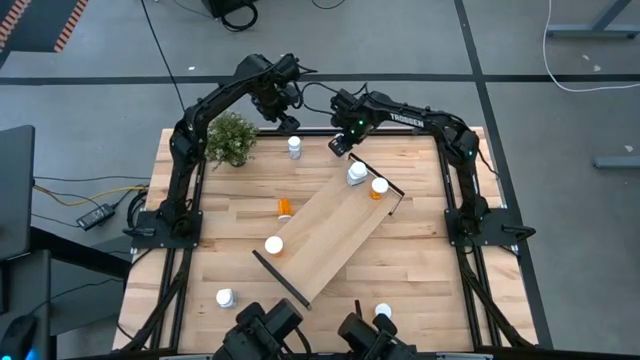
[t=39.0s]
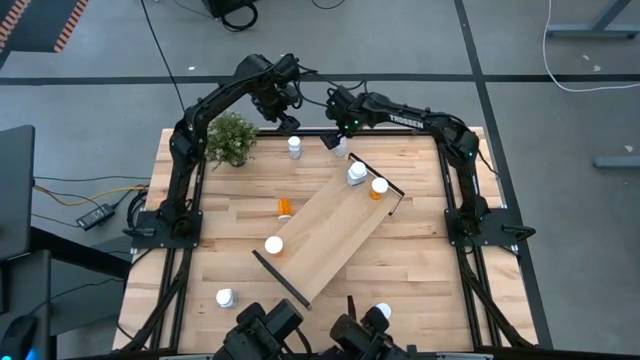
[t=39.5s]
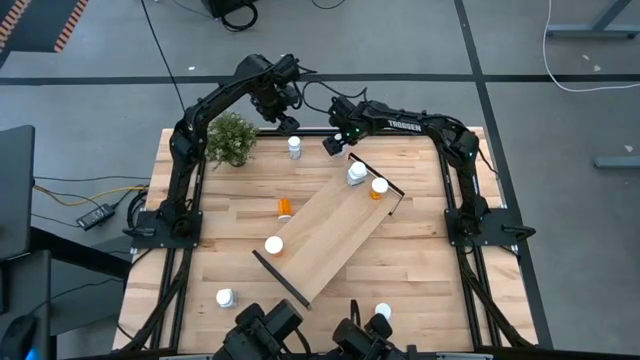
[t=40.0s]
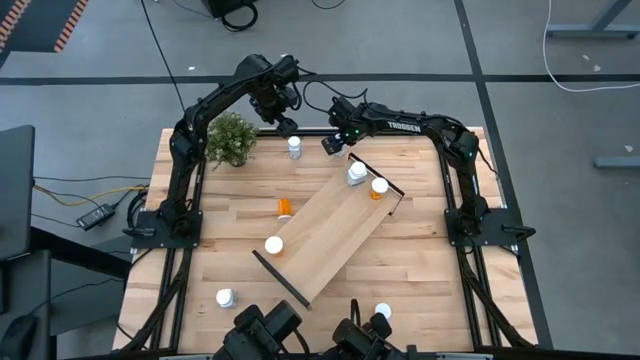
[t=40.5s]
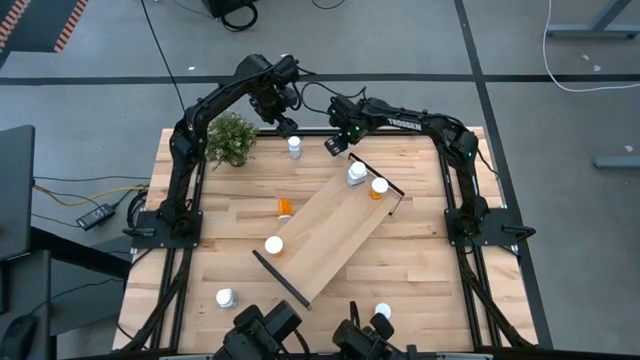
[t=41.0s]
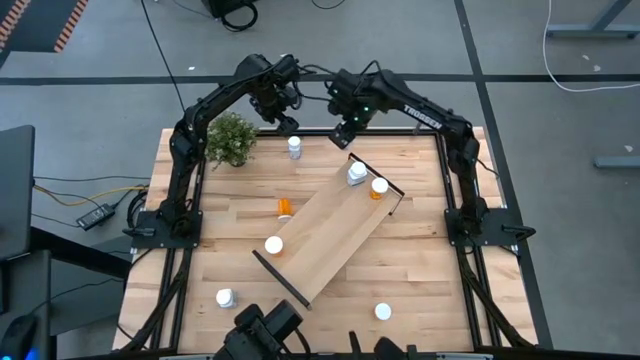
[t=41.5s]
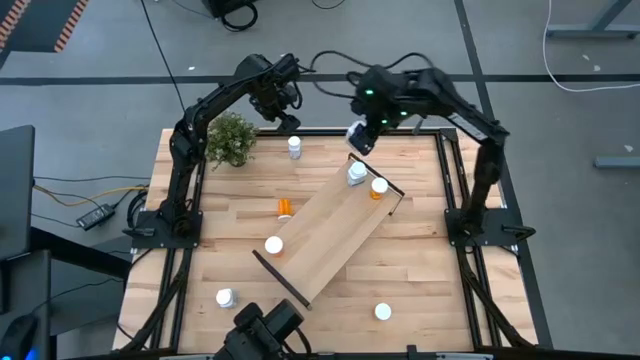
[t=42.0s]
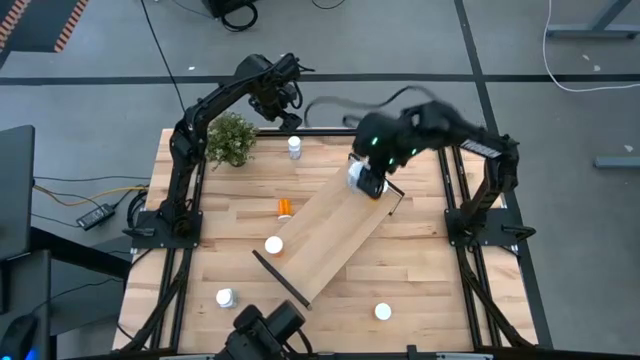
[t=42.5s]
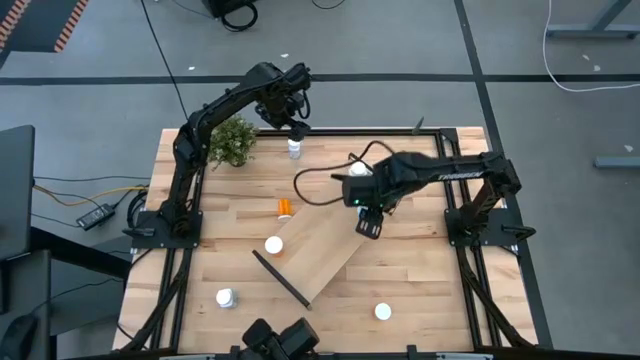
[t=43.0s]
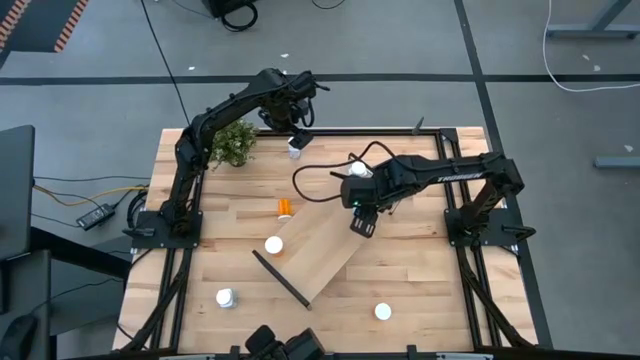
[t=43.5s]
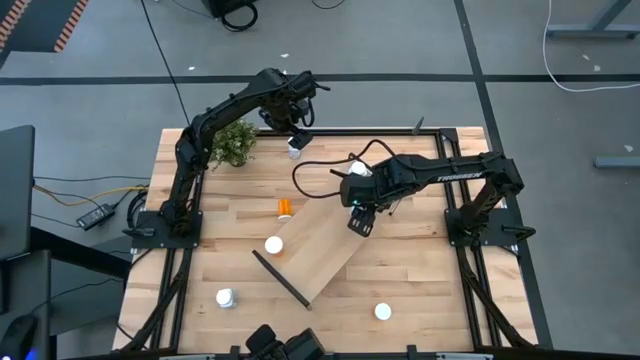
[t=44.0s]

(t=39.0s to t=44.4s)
Task: Pick and place medicine bottles onto shelf by color
Put the white pill bottle on the shelf

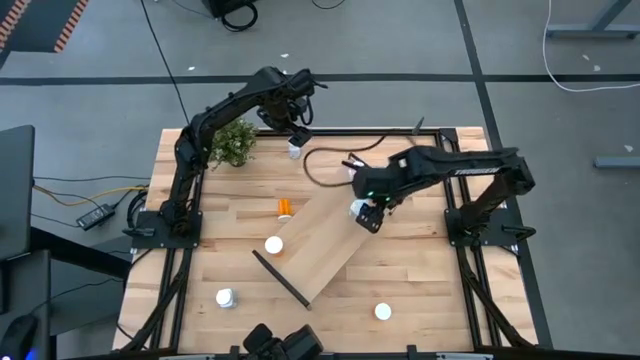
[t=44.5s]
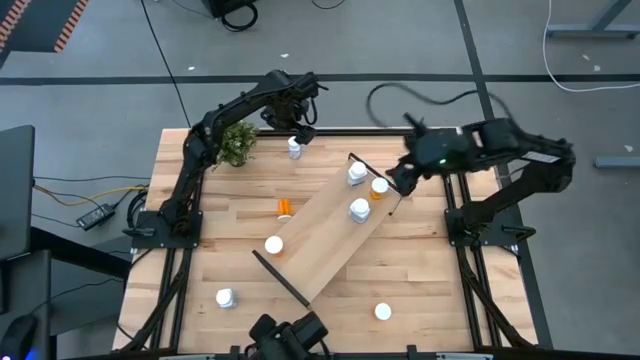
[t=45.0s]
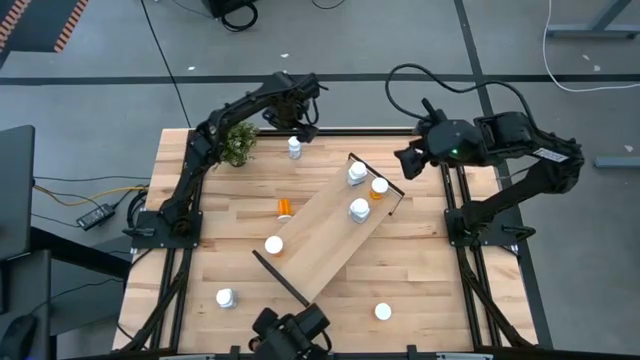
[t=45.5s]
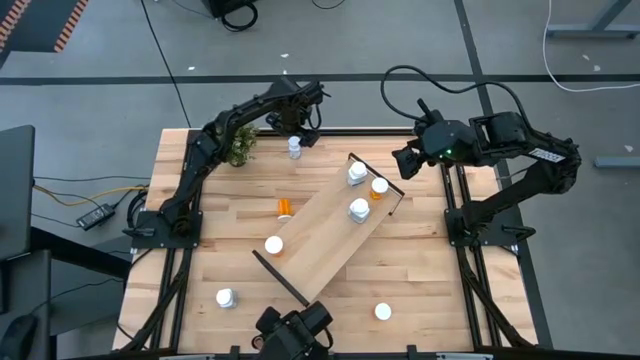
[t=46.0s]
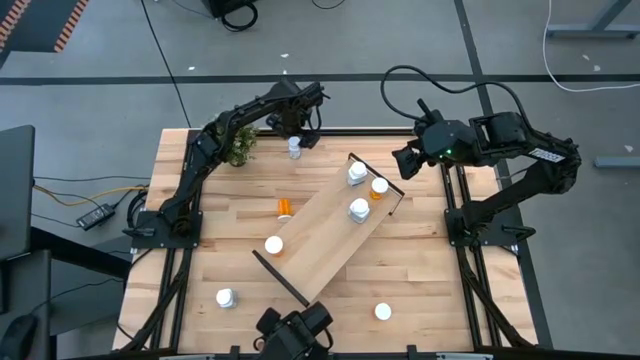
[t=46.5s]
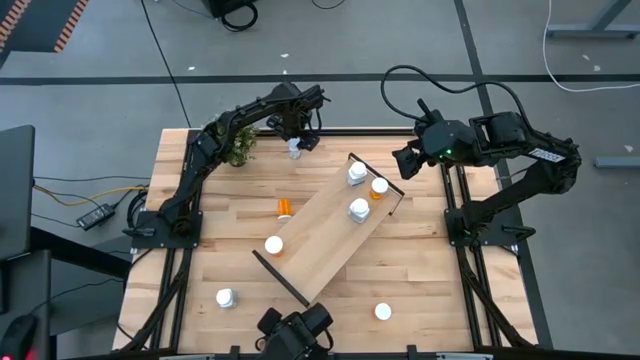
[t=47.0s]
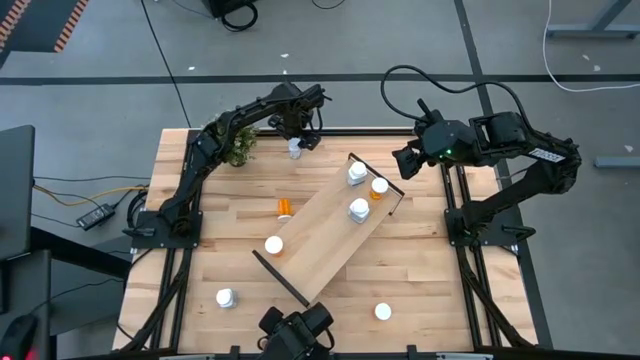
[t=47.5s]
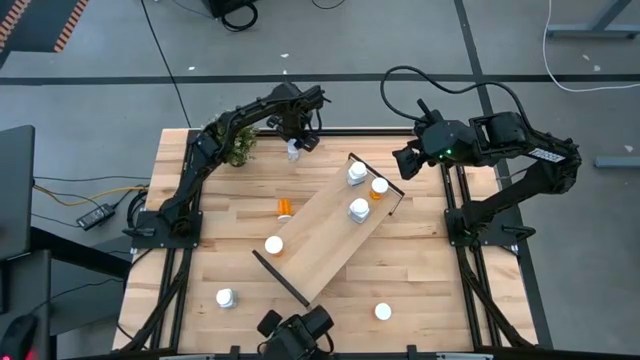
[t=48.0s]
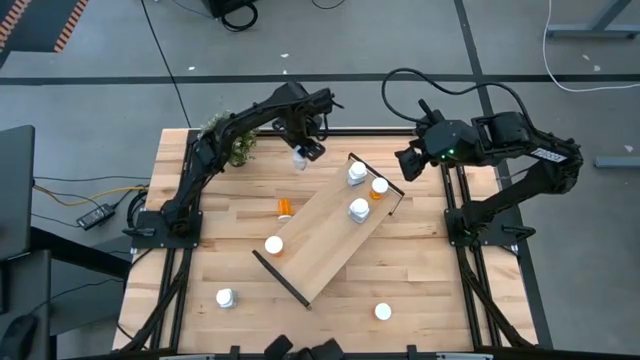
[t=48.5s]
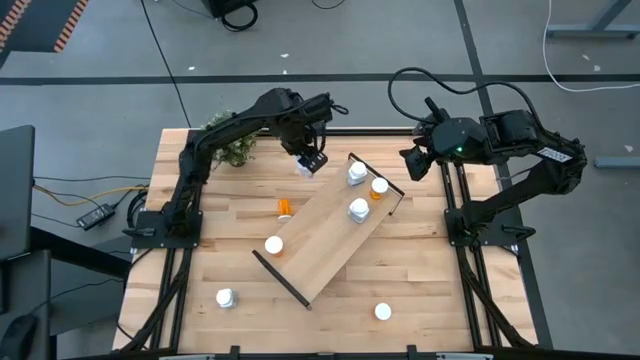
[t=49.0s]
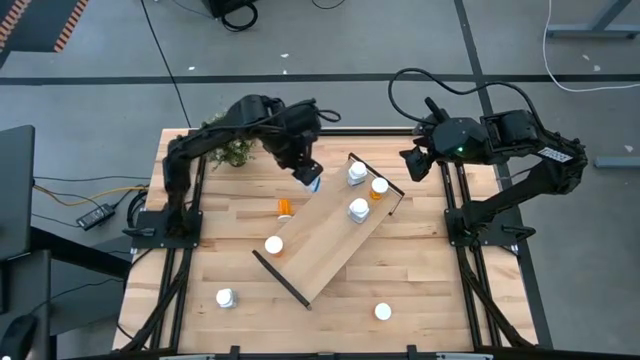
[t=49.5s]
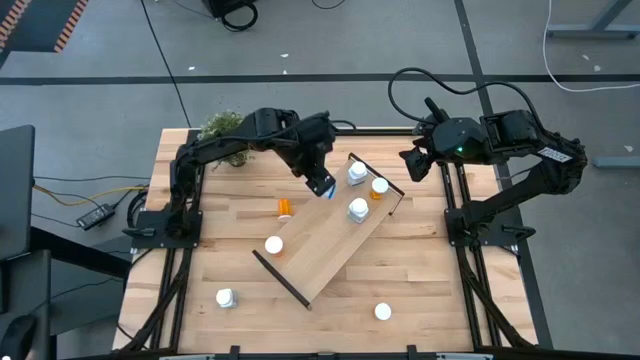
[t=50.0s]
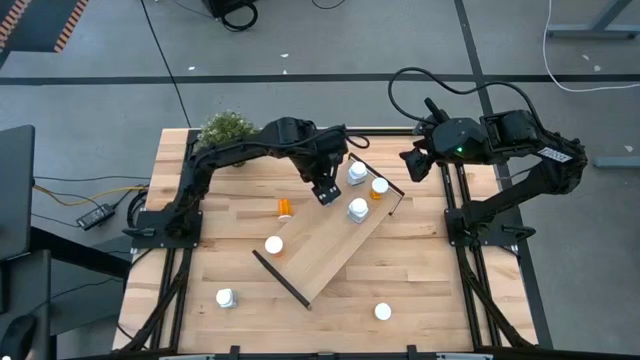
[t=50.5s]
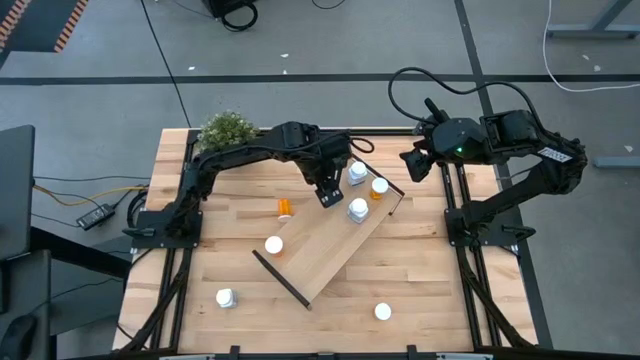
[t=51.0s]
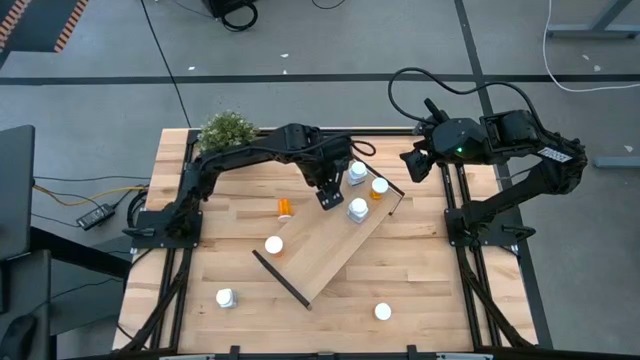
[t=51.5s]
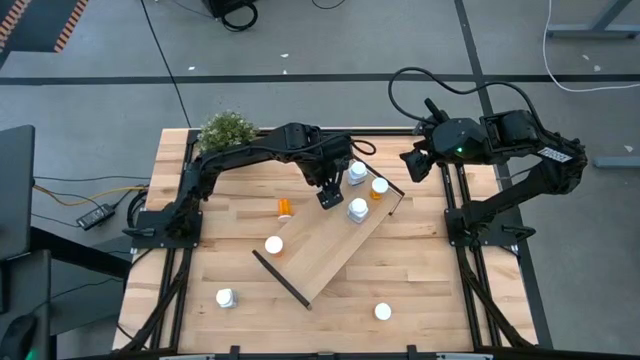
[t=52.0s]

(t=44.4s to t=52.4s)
Put the top white pill bottle on the shelf

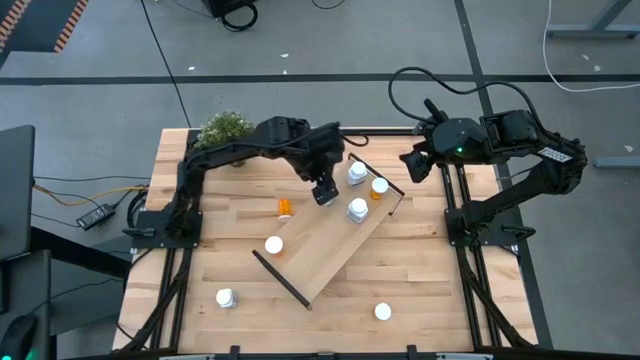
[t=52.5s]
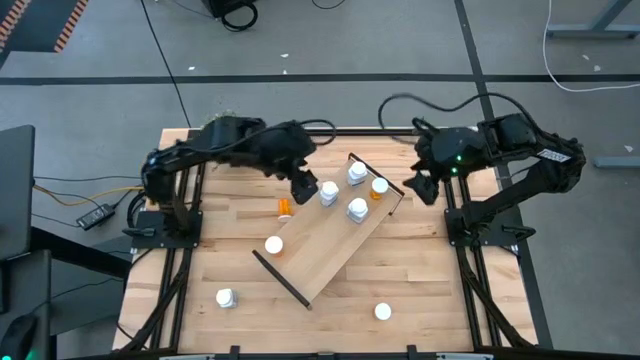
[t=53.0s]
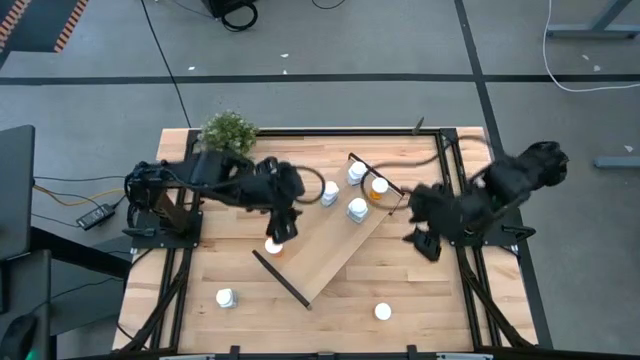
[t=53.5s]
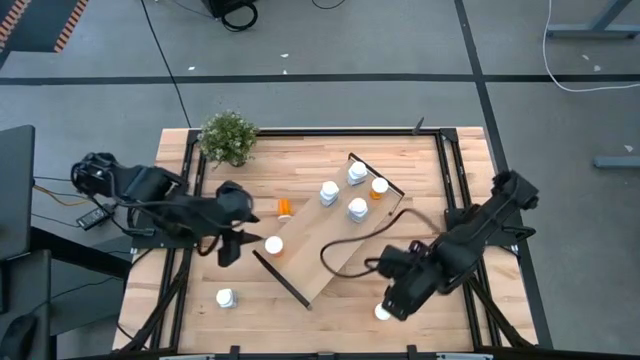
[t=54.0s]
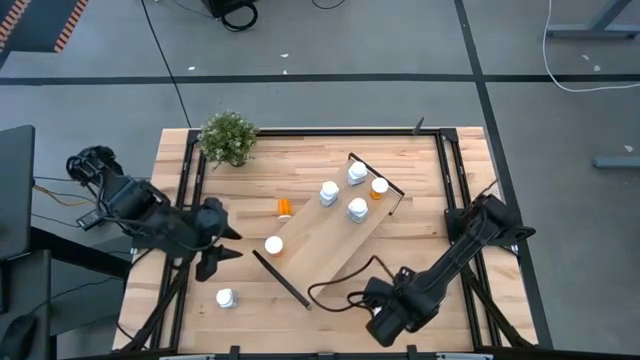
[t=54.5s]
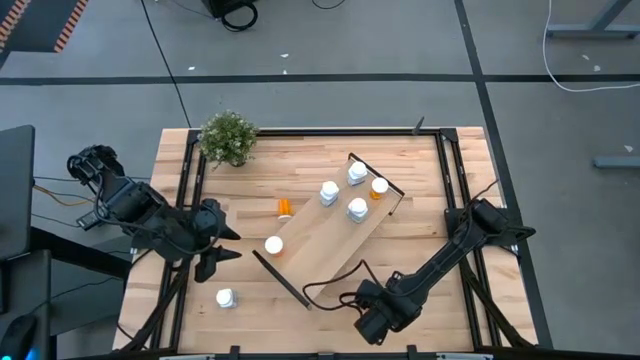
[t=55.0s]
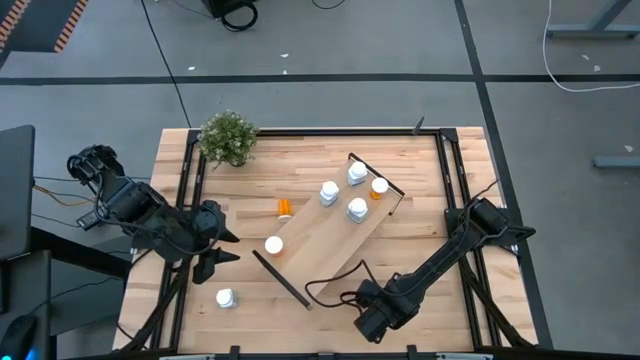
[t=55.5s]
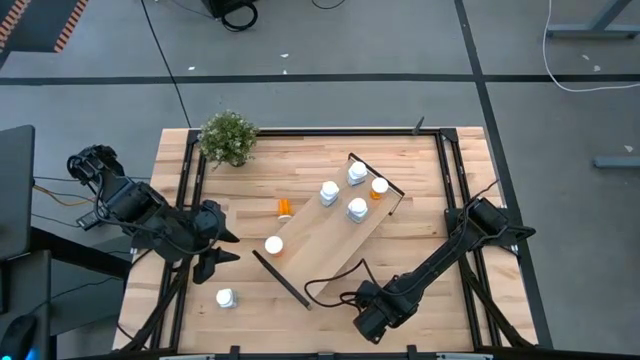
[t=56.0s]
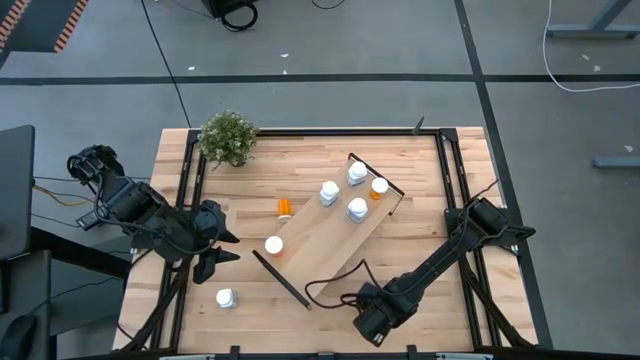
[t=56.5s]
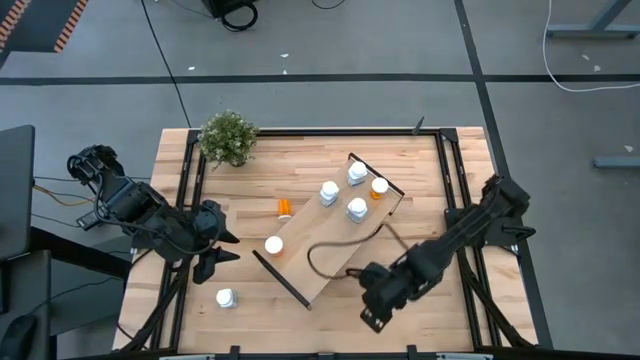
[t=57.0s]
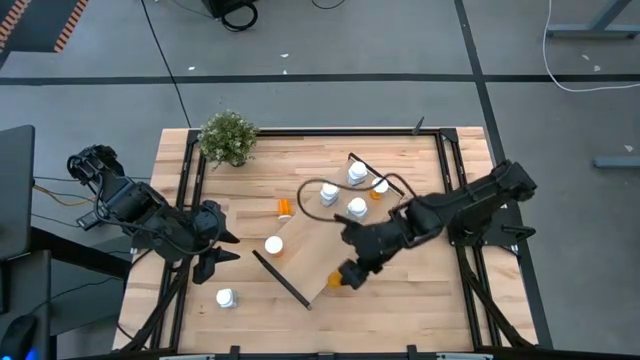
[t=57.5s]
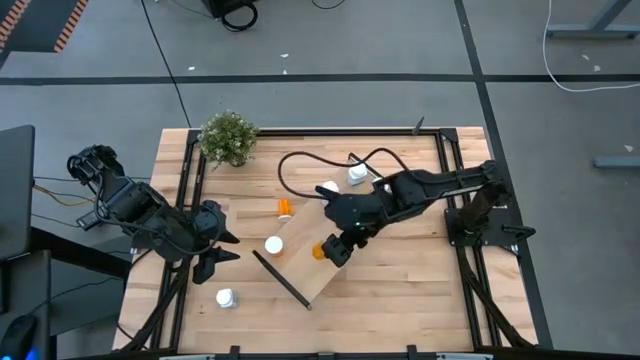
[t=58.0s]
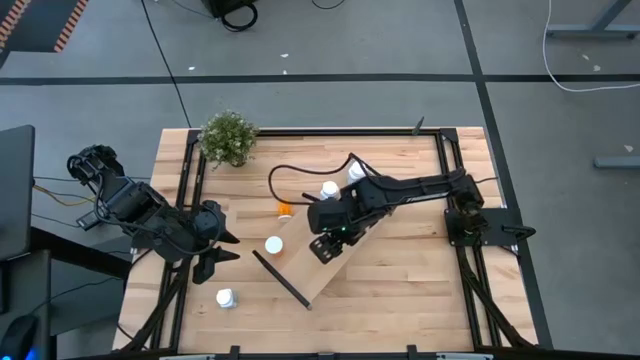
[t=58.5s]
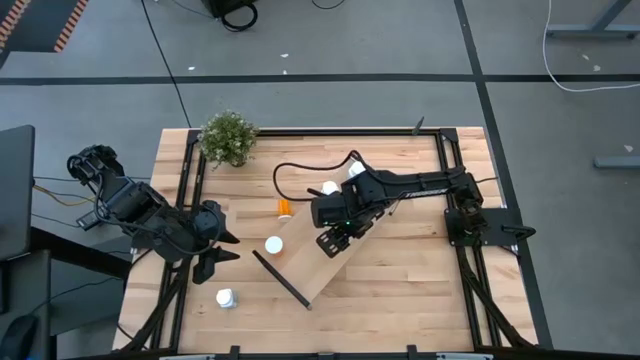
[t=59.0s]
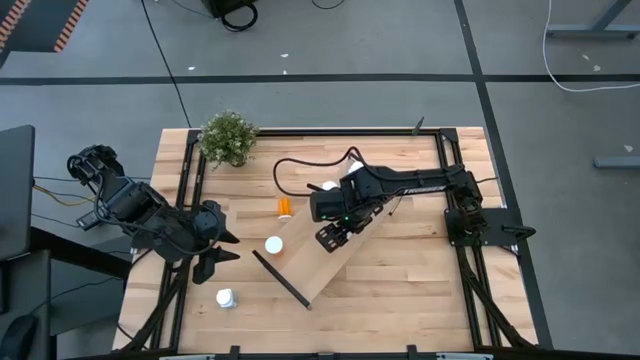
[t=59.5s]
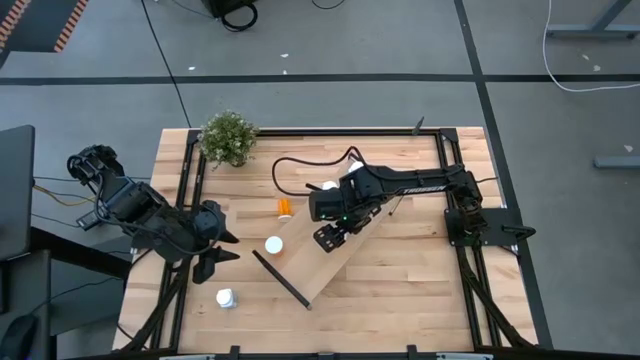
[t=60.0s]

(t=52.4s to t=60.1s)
Put the bottom orange pill bottle on the shelf
